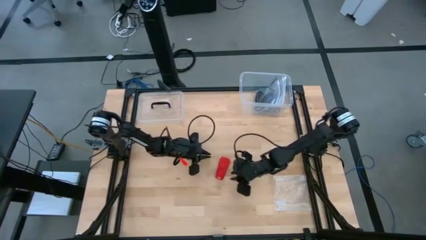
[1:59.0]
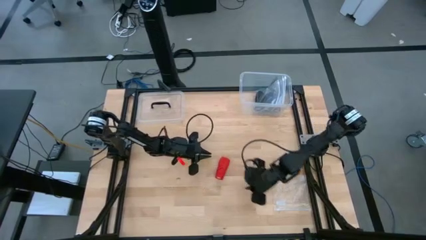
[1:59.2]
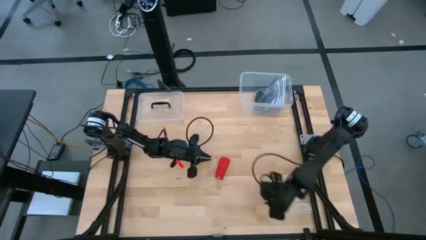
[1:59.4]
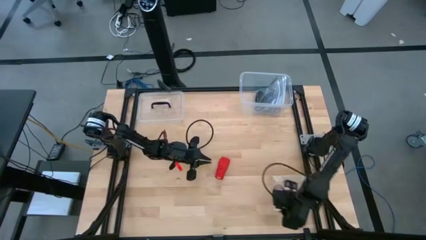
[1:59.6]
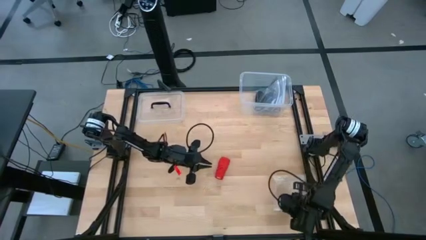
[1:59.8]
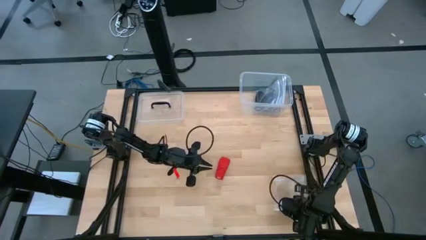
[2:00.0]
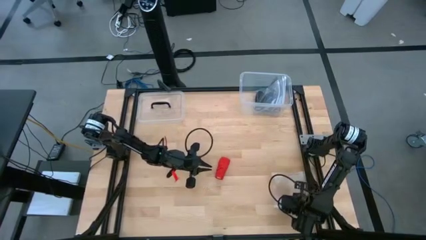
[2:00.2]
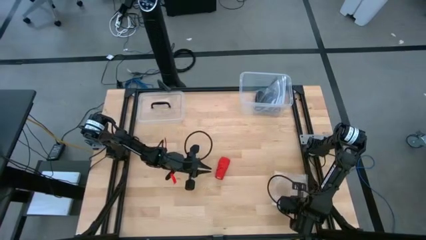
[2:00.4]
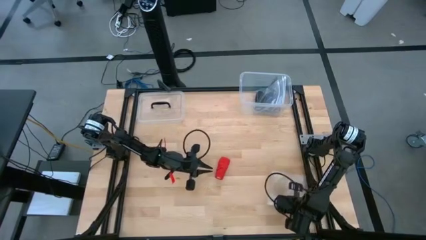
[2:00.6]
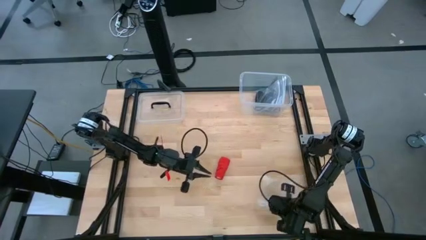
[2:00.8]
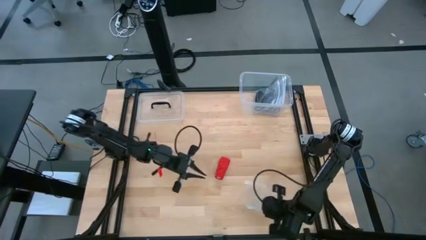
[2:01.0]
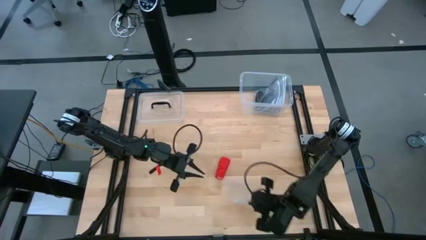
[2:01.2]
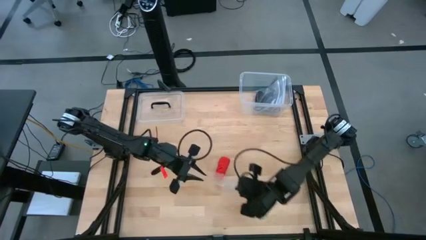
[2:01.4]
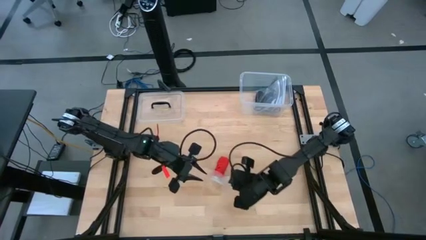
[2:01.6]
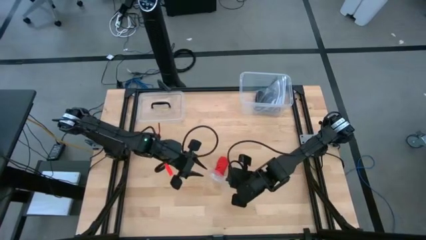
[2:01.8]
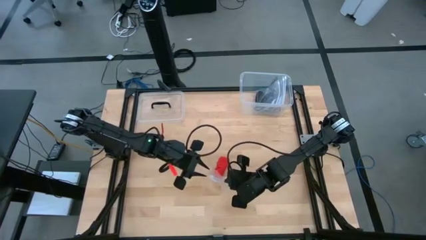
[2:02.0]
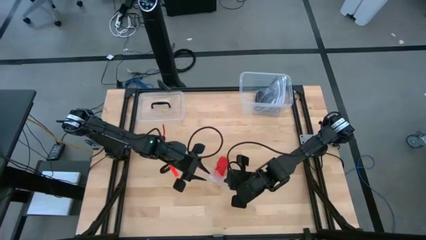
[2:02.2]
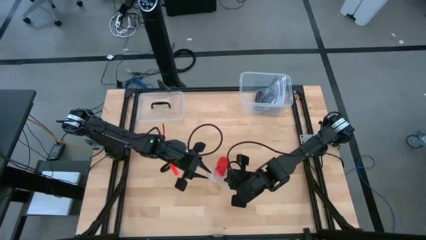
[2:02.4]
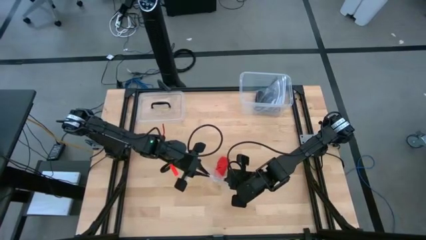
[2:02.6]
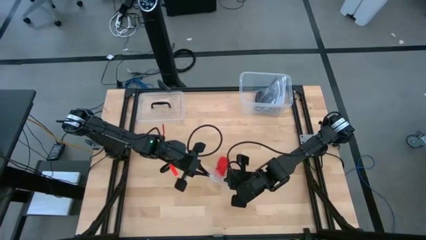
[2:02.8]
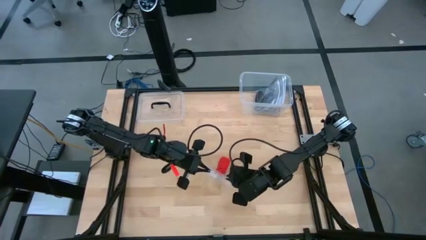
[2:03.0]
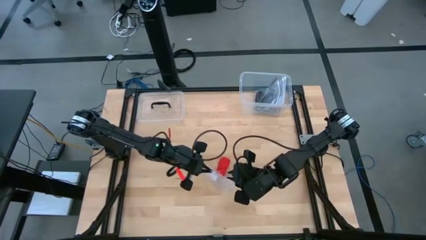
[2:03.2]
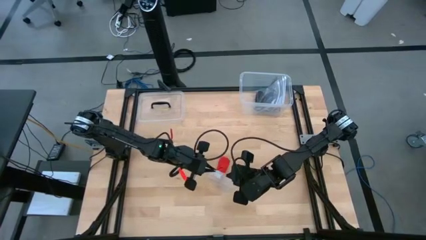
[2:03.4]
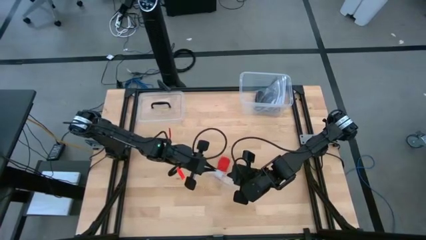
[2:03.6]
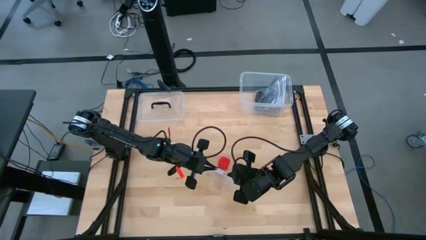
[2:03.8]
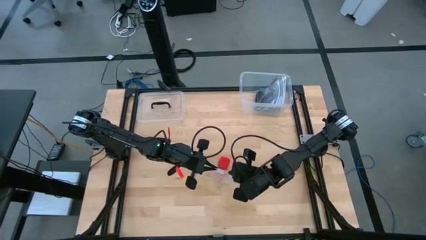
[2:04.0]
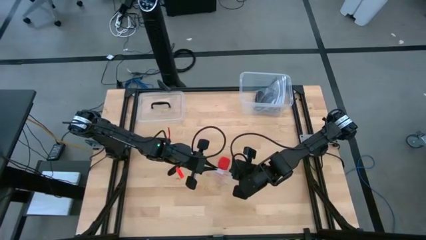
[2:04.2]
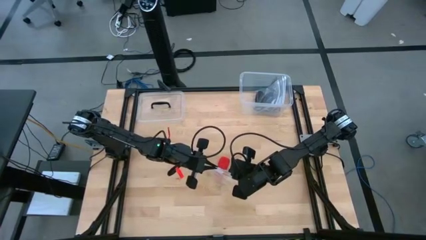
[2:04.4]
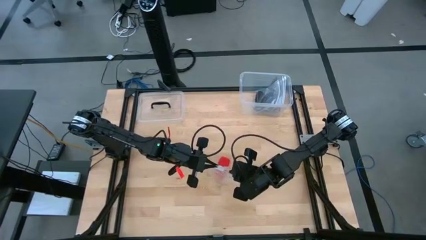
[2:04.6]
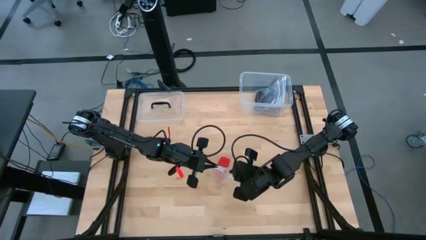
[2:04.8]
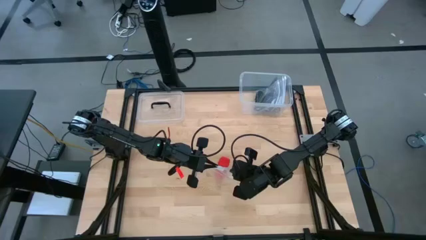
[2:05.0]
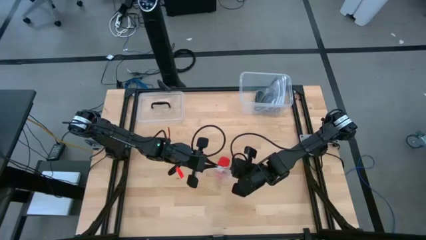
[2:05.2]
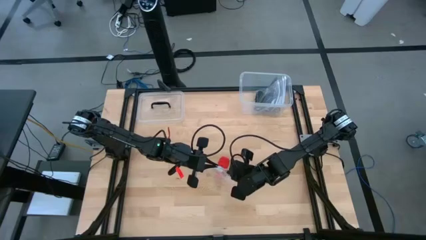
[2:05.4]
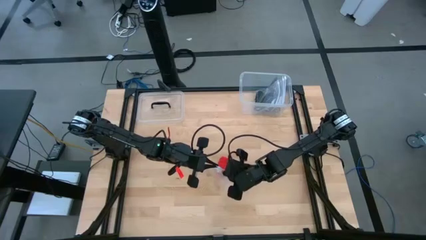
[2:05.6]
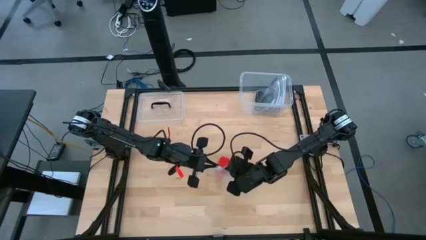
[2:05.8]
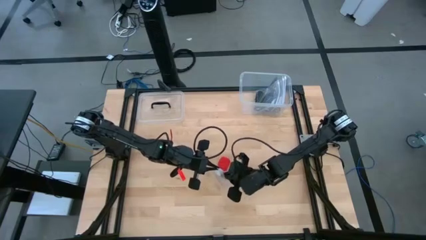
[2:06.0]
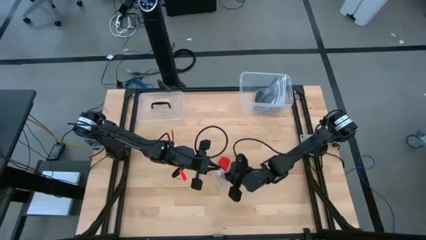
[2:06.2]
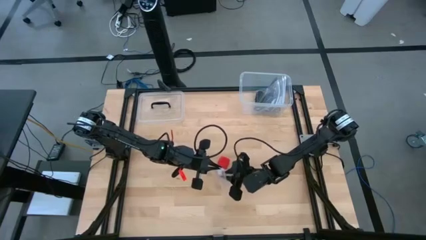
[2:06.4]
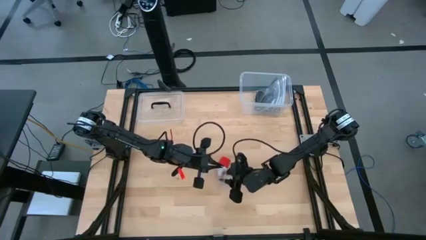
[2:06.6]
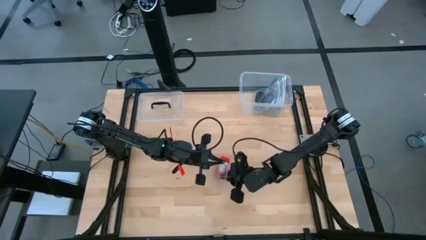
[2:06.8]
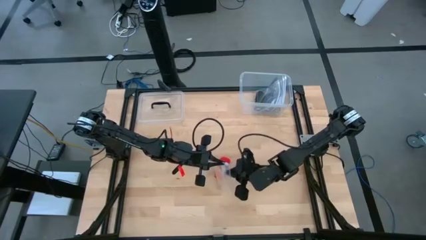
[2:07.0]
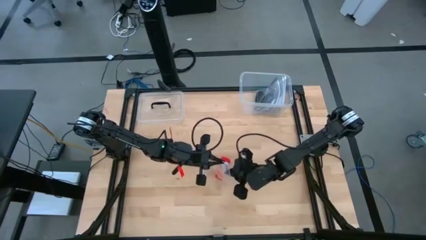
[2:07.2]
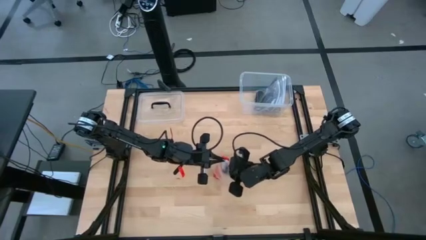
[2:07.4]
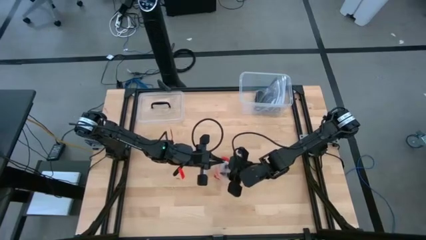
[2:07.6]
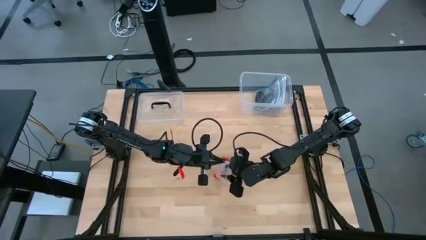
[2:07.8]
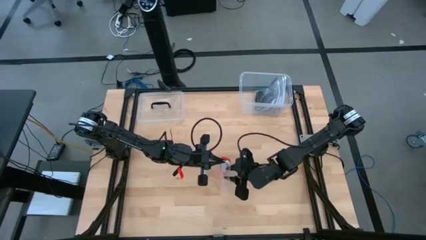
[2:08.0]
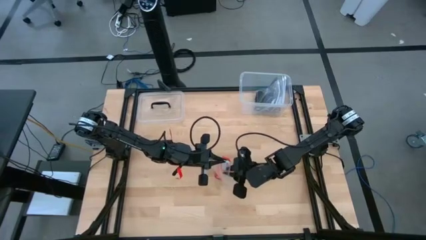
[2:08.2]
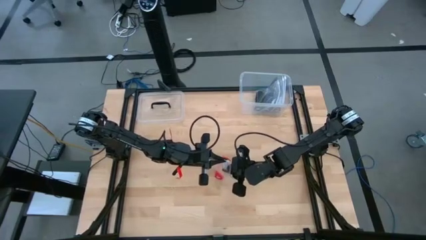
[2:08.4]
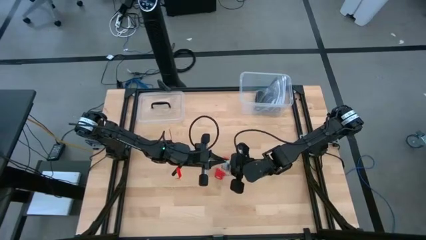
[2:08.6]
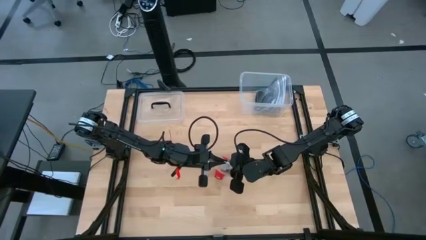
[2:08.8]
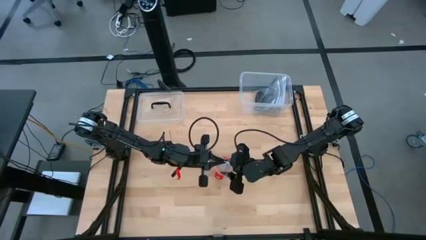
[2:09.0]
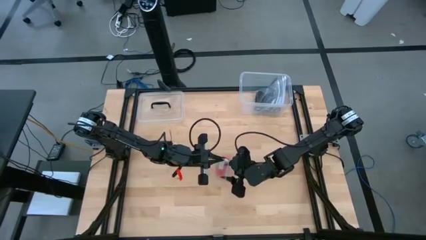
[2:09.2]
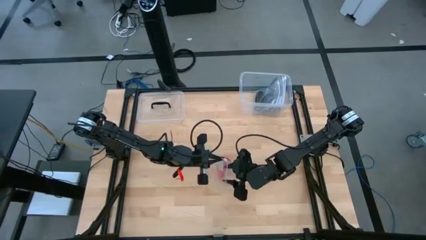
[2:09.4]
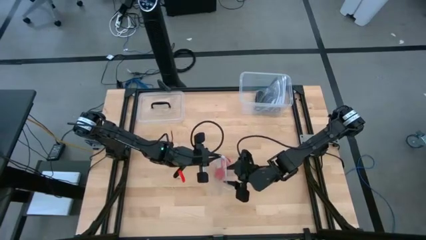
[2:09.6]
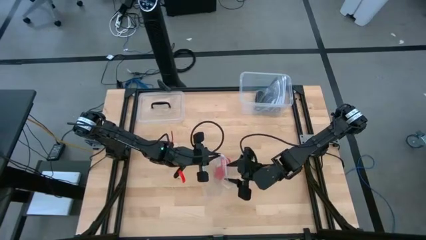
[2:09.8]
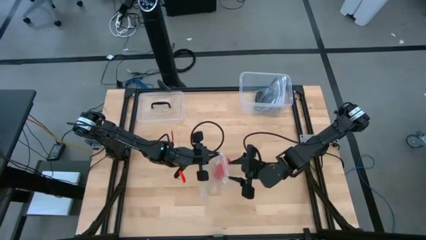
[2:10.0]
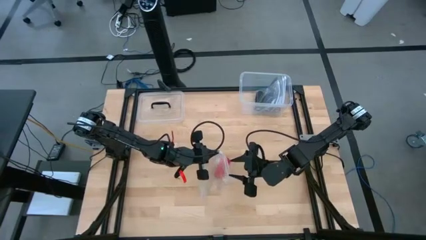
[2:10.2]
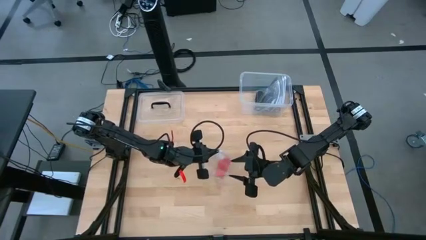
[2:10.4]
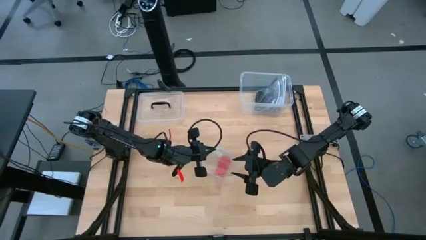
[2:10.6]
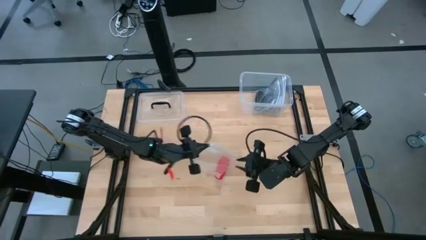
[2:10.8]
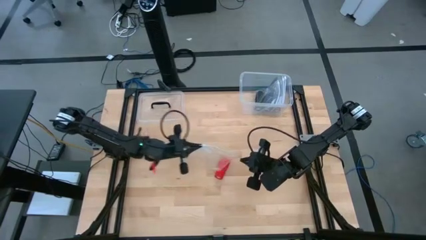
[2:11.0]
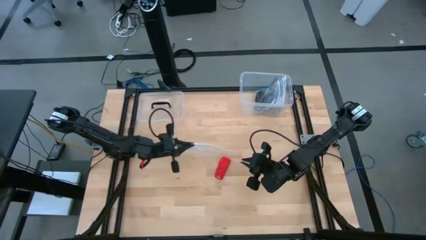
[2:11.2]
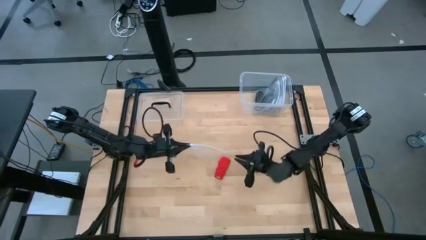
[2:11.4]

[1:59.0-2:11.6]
Task: Roll bandage
Put the red bandage into the transparent zip bag

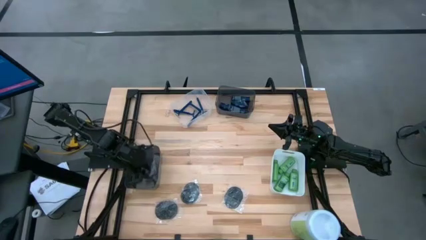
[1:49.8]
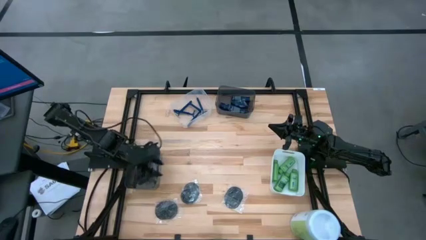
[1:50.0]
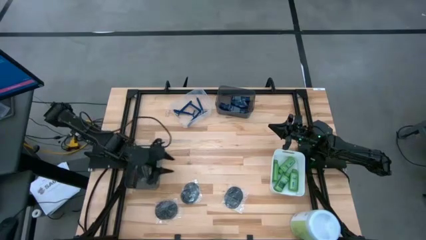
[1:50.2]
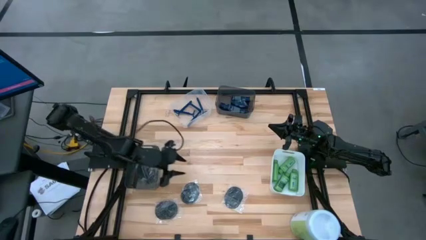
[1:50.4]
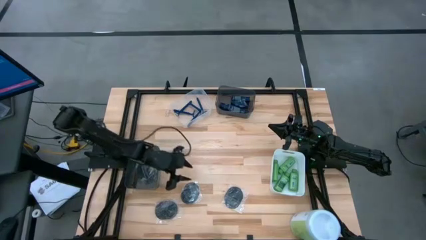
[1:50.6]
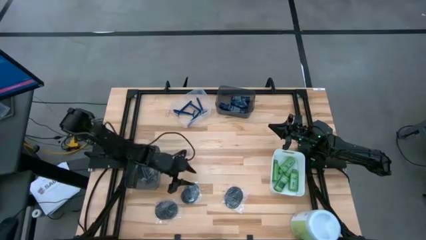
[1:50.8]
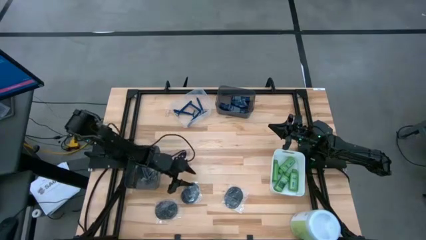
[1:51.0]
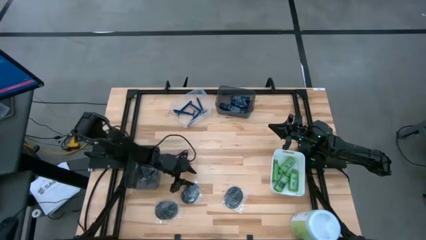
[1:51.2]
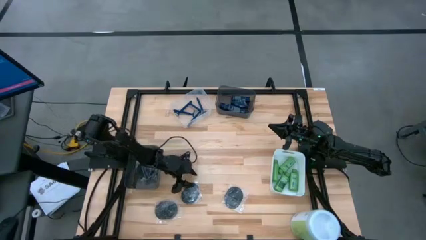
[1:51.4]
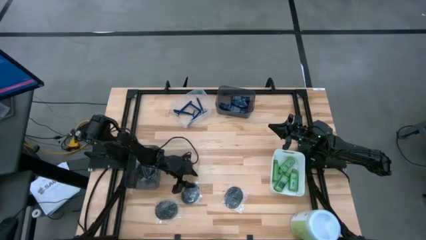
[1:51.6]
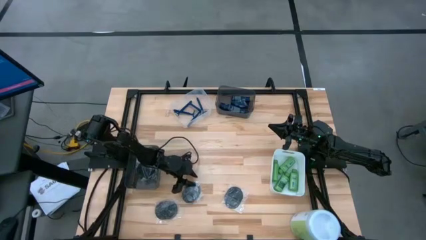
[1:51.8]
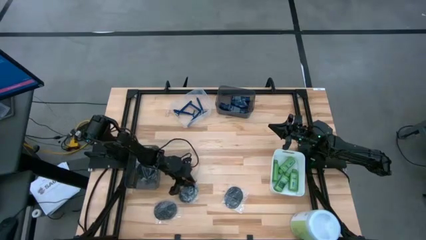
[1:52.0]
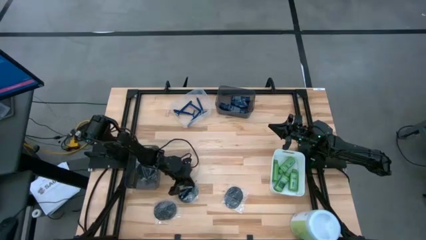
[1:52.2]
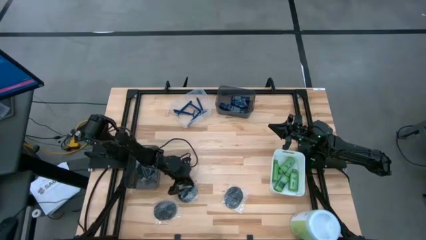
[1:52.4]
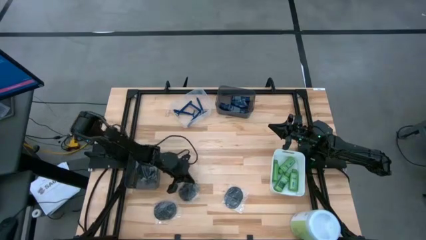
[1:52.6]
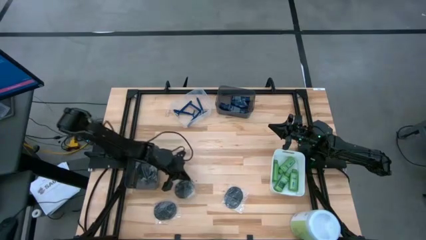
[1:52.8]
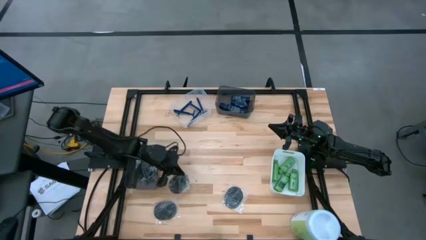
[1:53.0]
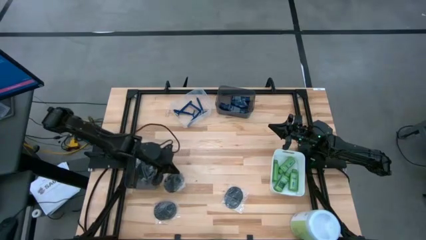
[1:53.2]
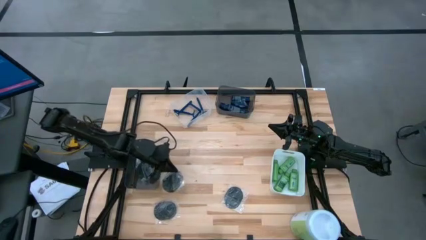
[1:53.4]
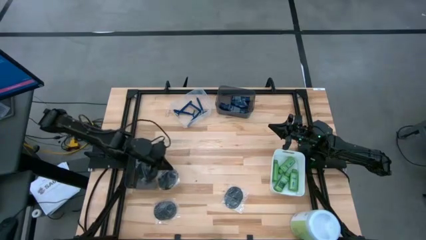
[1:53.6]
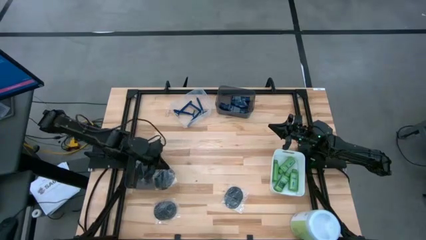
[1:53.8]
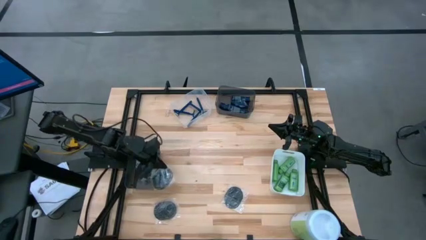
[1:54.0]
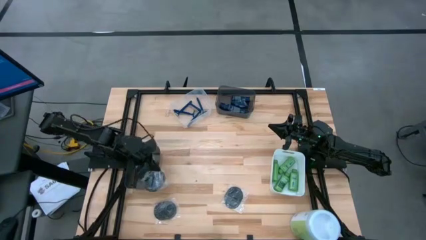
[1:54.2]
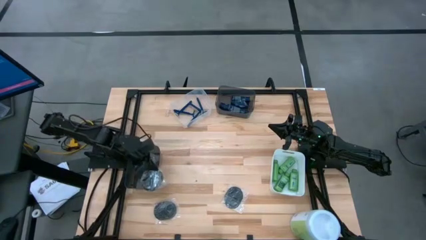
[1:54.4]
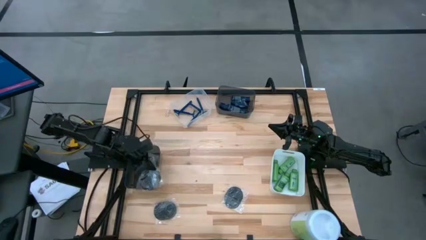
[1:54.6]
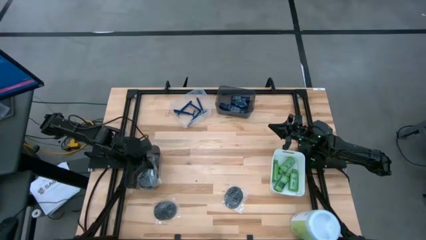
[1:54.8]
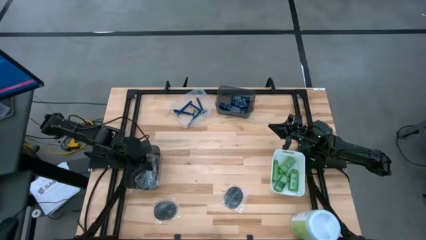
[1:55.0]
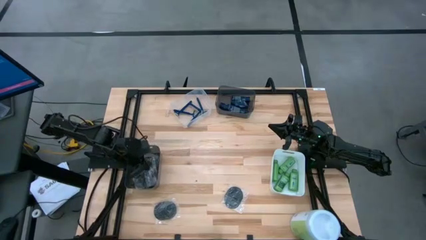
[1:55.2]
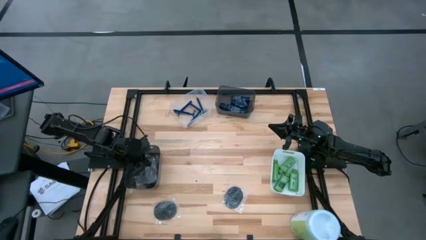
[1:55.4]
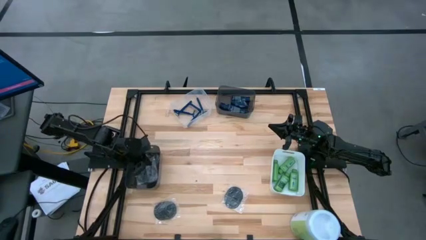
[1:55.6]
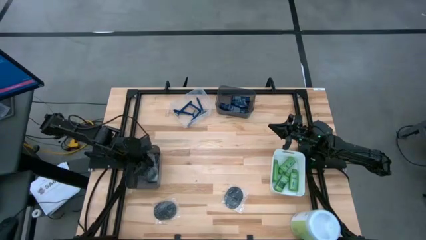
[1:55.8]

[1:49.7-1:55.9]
Task: Pick & Place Travel size toiletries
Put the black hairbrush into the bottom black bin
